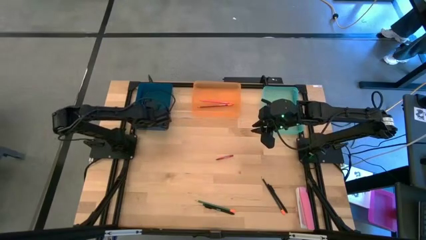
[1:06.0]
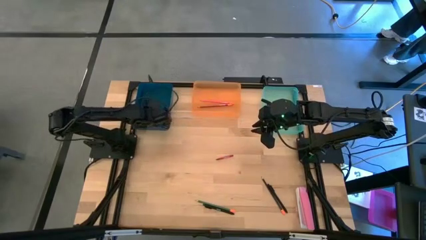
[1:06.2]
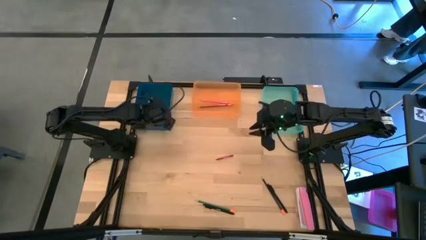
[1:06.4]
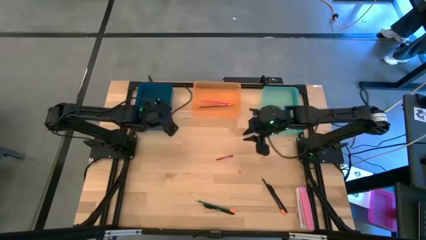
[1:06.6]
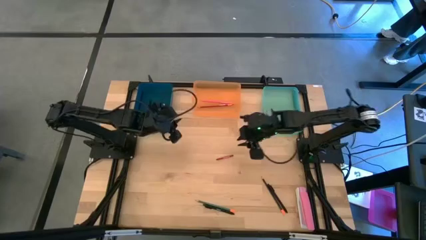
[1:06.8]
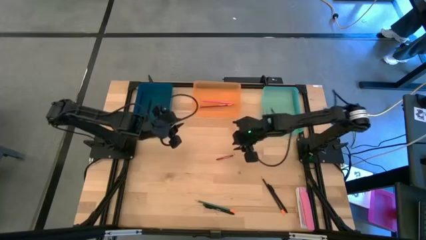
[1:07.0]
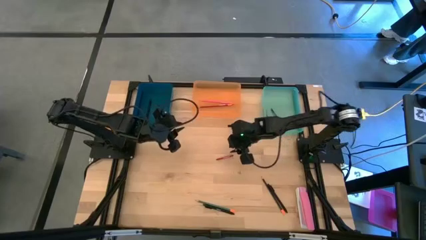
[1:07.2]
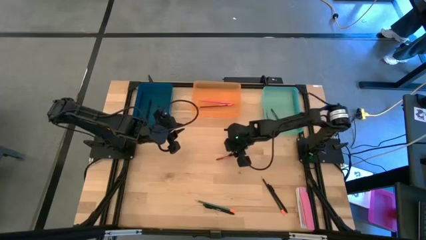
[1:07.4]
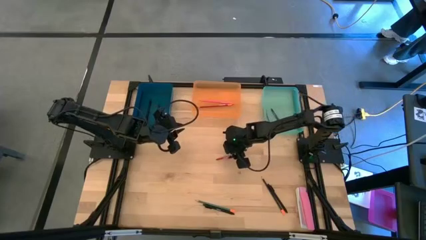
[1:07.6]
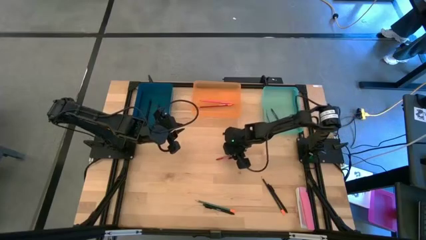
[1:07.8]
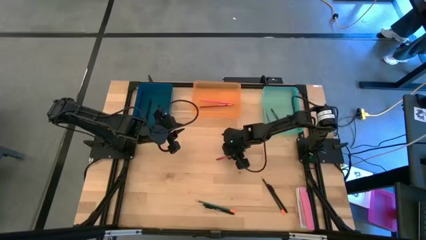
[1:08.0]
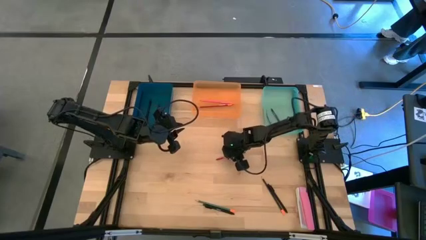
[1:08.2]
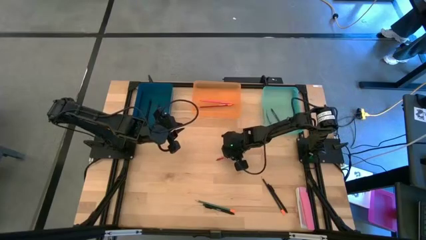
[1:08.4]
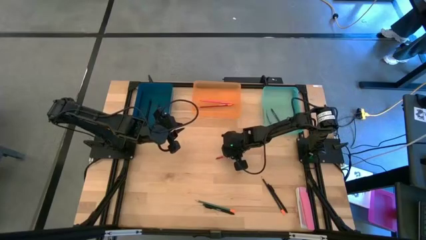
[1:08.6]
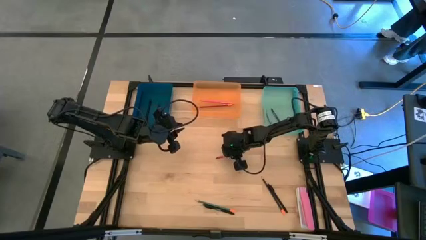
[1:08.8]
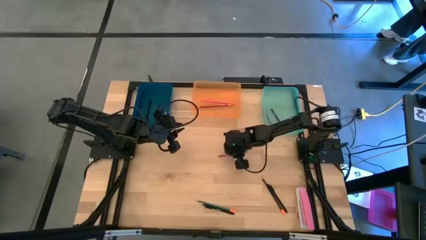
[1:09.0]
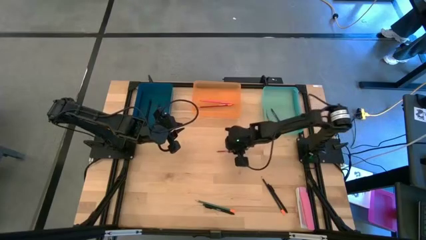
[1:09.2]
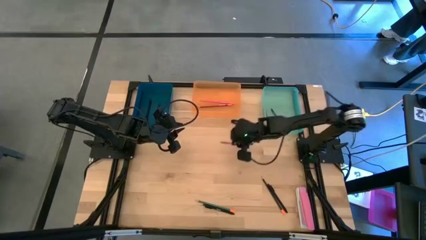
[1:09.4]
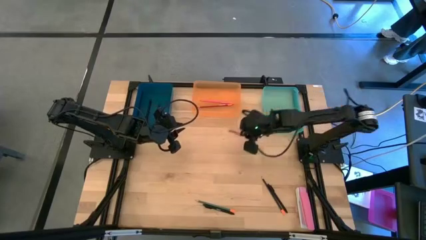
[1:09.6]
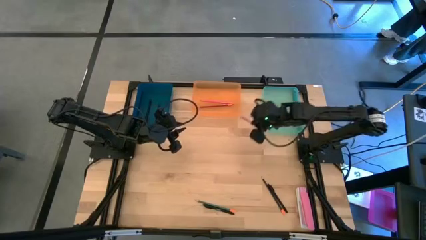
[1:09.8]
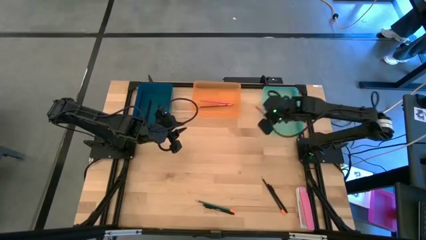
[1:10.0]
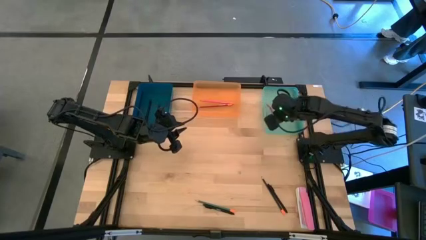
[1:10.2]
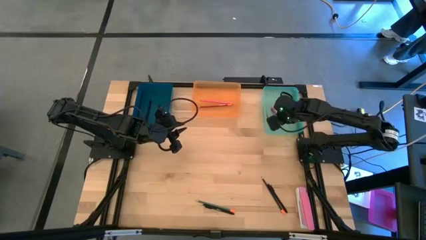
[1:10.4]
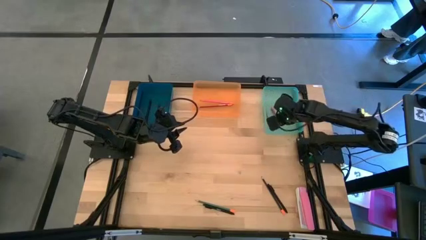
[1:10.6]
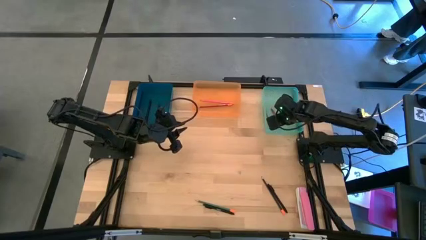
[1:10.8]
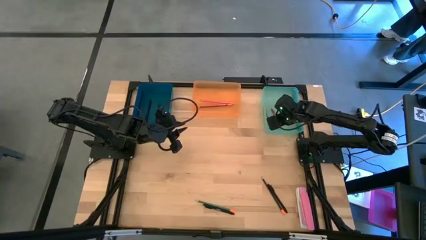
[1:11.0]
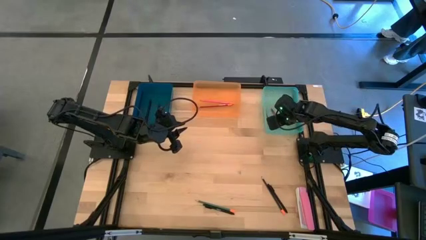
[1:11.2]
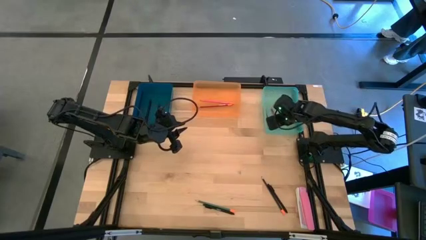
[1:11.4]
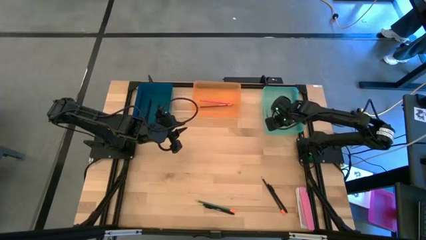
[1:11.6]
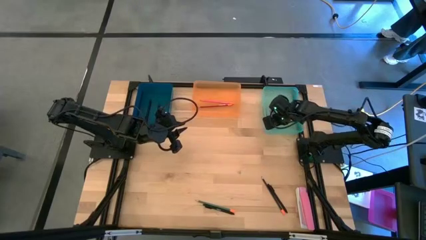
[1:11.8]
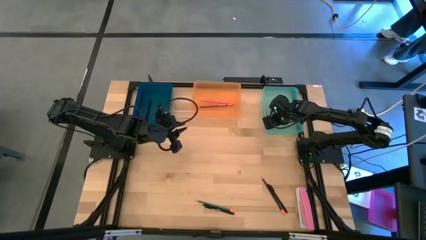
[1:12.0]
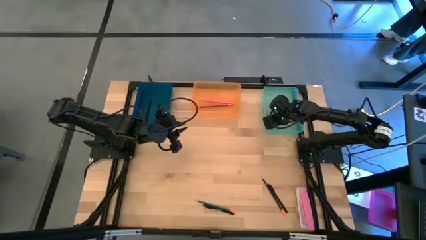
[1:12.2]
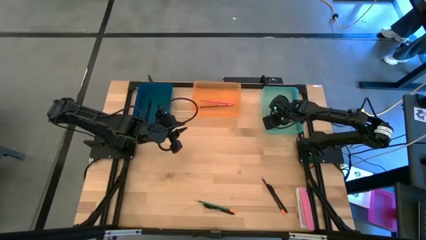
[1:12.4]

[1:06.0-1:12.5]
Task: Sort crayons/erasers/pens/pencils in bins
Put the red crayon into the blue bin

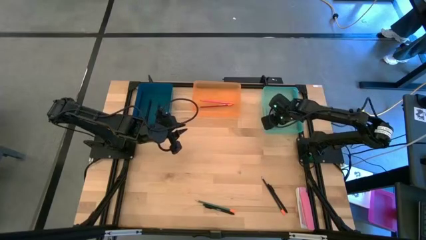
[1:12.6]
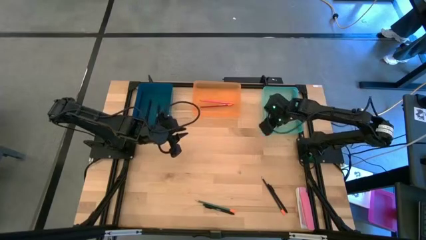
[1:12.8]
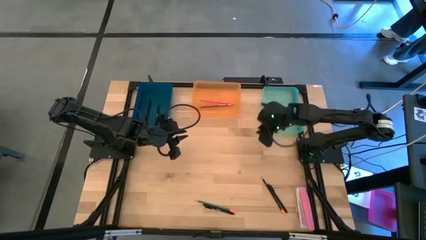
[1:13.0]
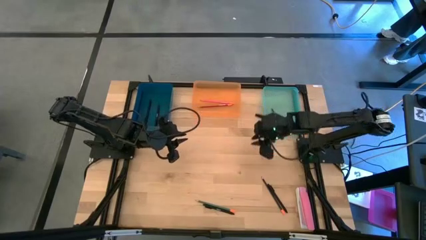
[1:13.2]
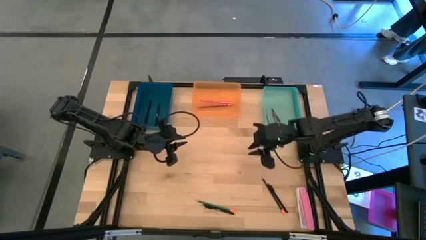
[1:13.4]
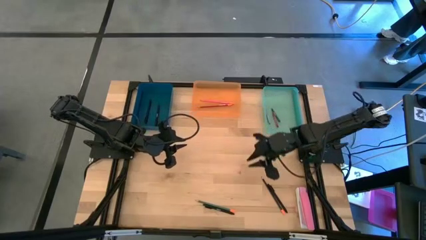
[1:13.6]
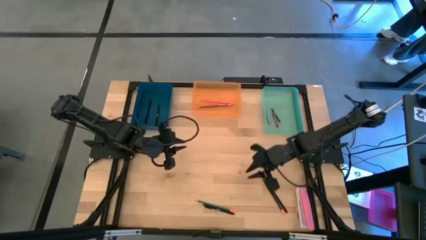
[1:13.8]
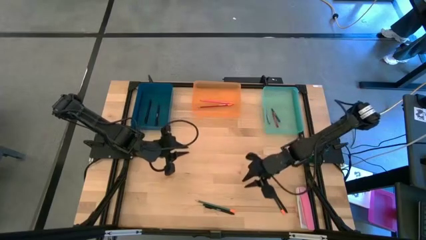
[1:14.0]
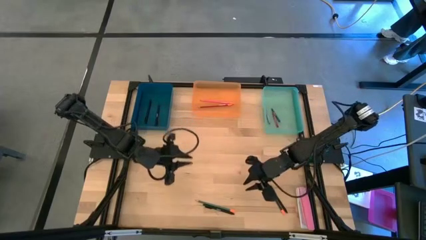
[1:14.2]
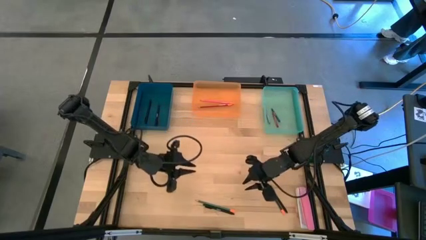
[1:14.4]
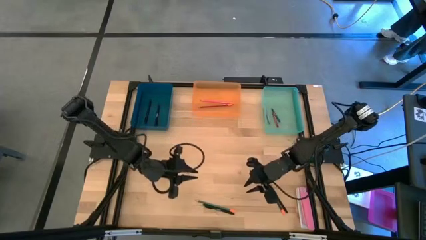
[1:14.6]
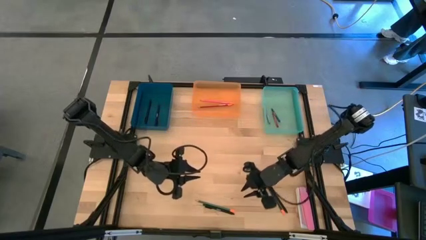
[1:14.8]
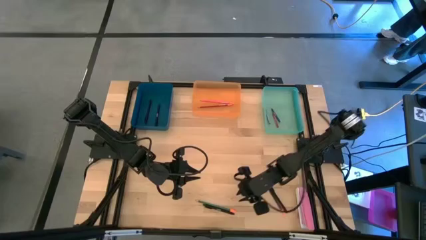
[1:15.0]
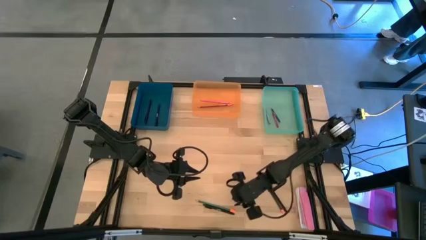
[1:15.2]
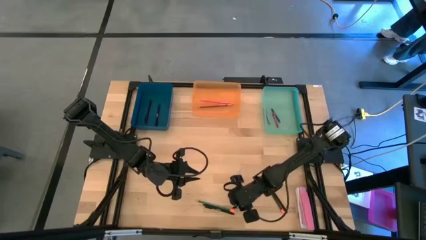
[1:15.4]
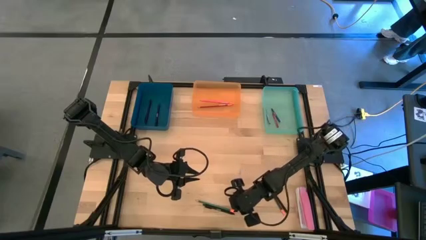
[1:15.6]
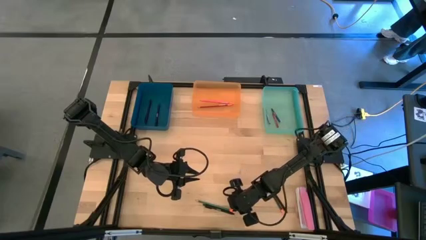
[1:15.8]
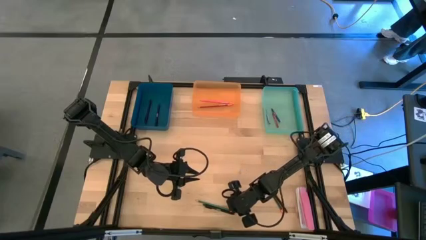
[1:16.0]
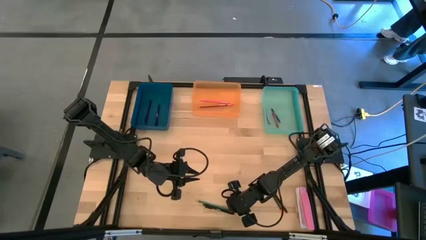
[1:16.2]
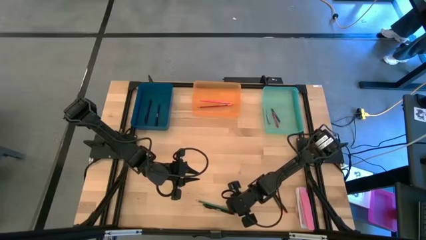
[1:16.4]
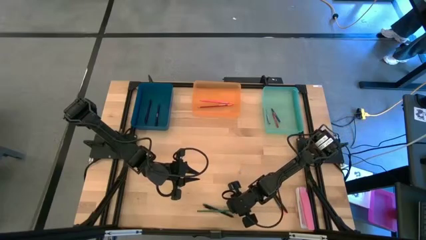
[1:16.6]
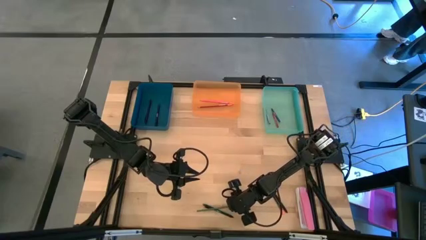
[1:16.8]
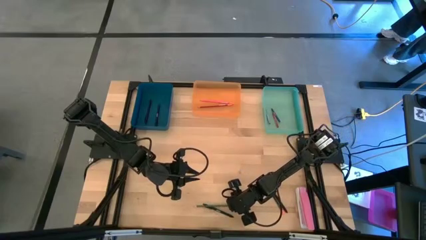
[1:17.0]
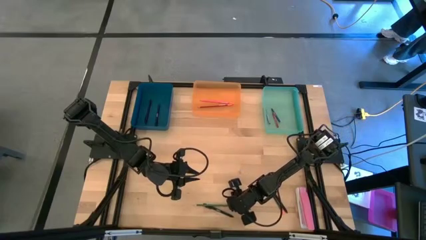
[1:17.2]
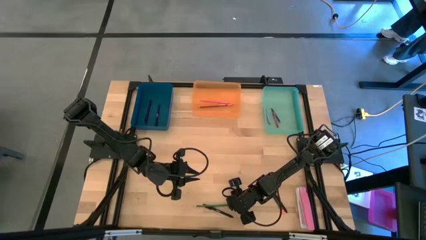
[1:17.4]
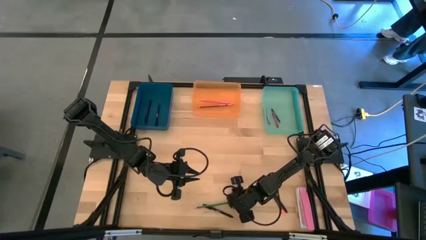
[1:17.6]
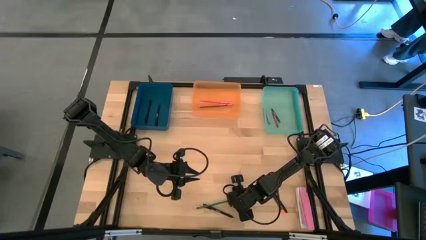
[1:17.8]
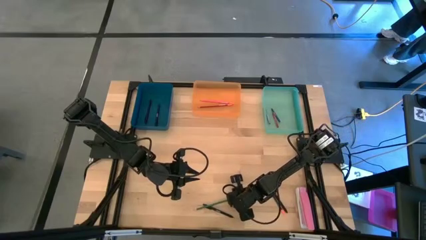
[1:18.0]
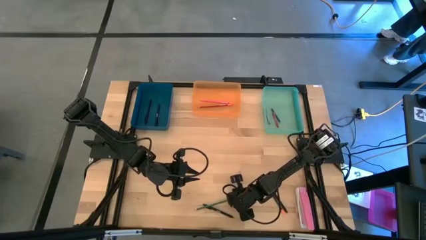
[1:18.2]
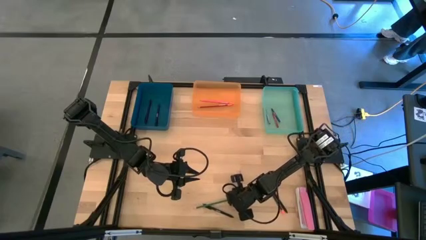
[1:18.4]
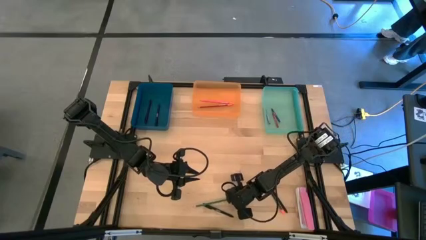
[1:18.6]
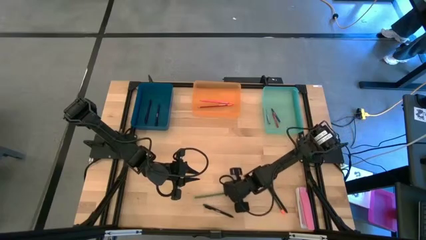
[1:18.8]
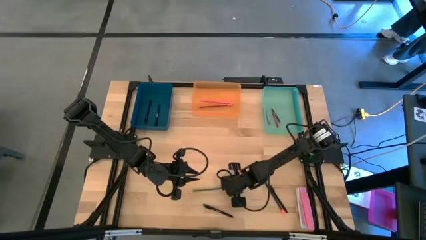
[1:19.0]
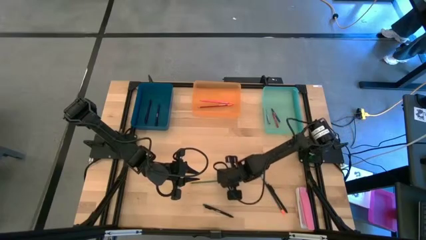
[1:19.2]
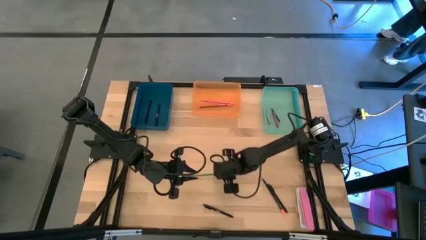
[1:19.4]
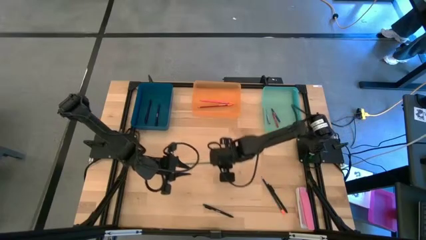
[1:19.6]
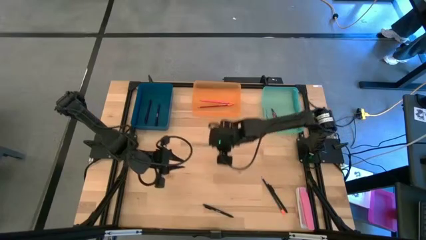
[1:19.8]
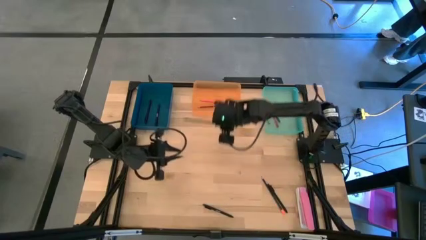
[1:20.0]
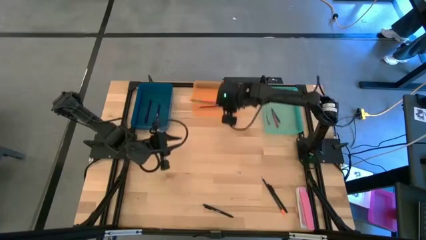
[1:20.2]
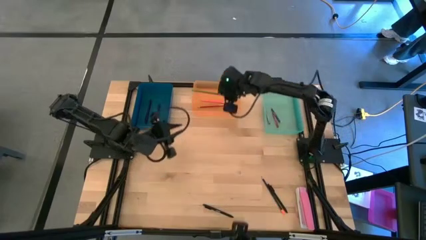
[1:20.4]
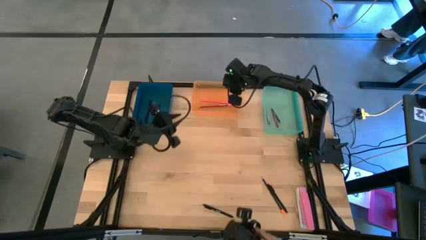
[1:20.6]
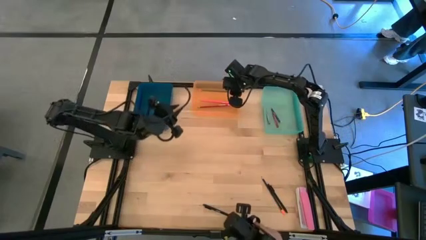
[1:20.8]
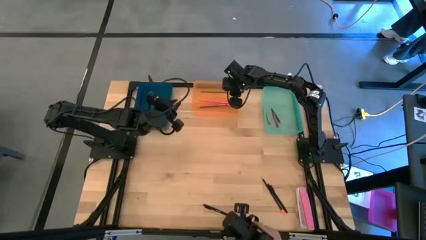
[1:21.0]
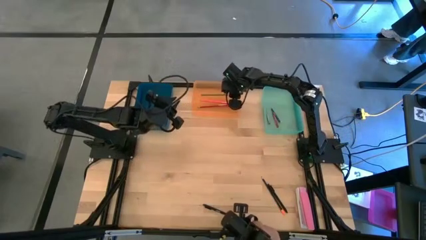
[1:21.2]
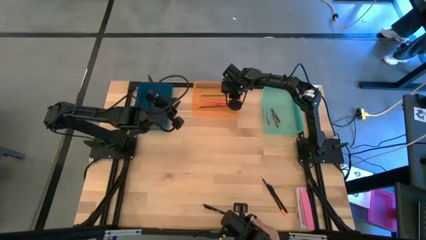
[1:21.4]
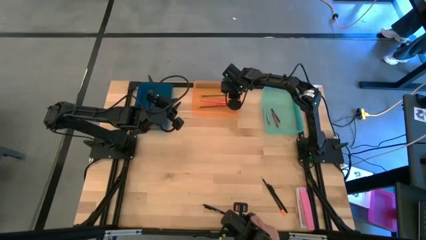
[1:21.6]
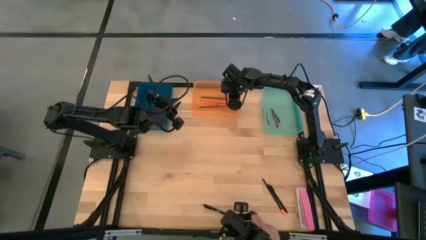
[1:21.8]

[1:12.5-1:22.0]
Put the green pencil into the orange bin

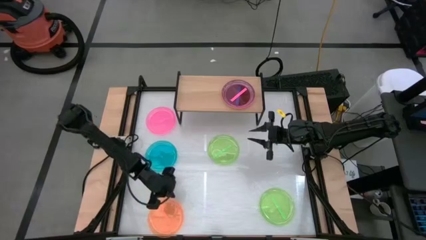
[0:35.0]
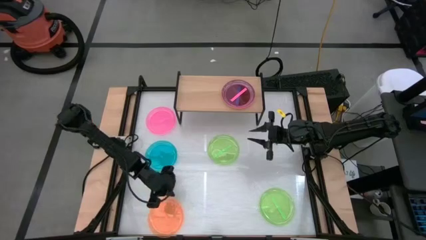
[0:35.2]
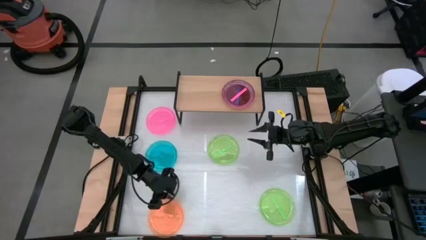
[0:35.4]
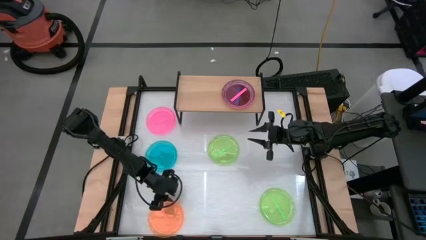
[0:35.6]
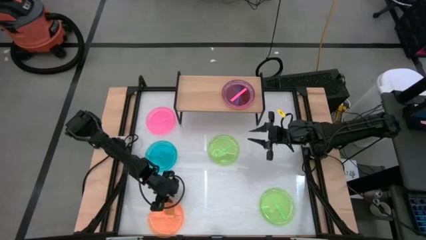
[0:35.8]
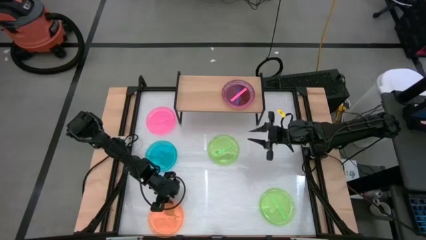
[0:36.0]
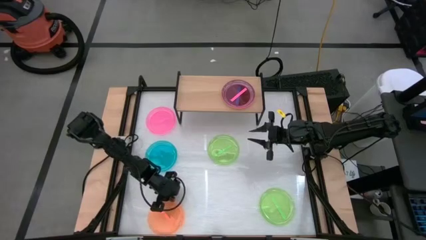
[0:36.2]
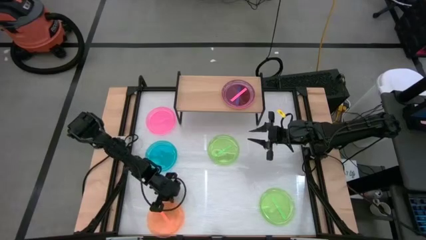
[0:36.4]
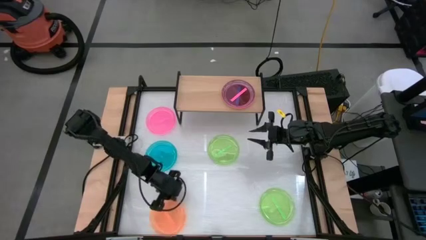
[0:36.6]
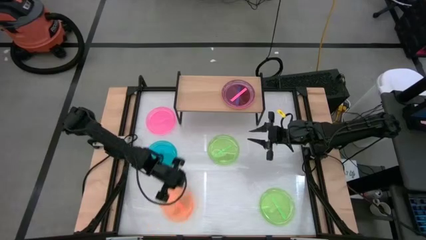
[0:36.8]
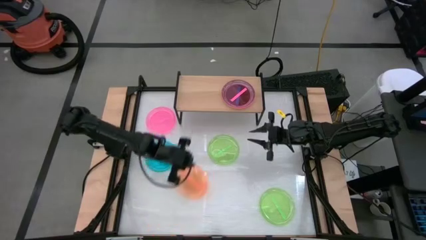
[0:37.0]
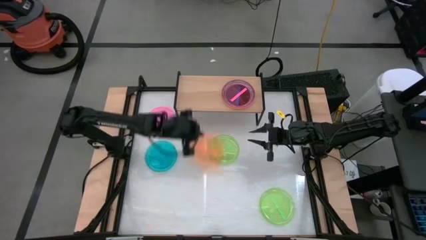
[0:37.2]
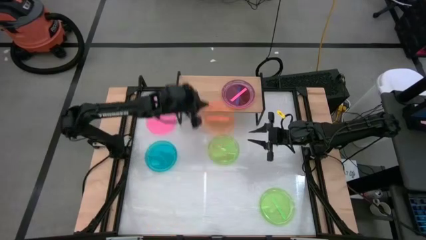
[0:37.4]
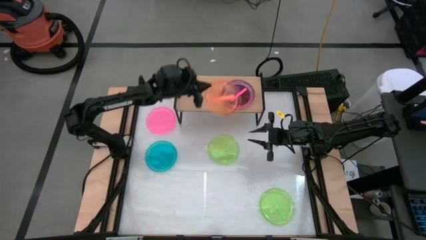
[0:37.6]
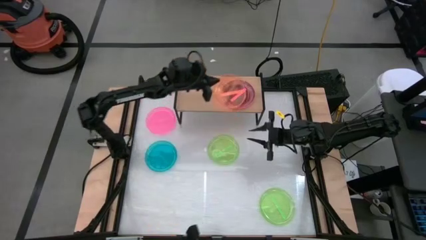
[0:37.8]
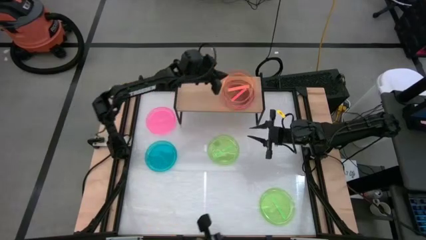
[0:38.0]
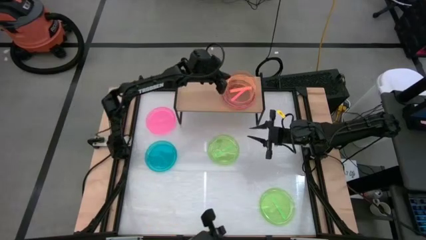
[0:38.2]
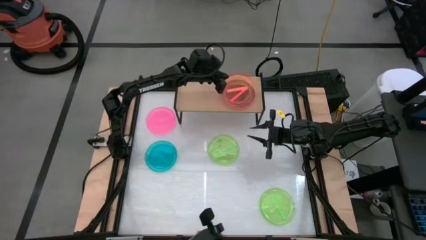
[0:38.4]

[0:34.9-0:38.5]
Task: Place and stack plates onto a shelf
Stack the orange plate on top of the pink plate on the shelf
